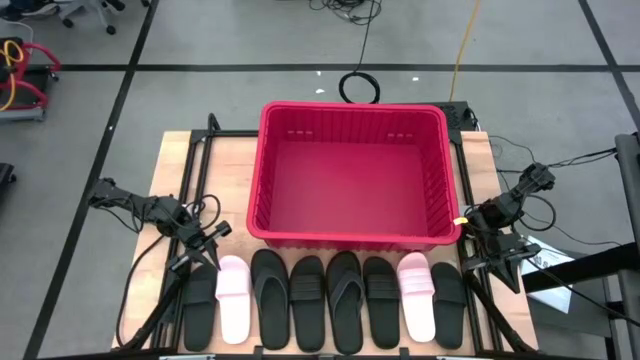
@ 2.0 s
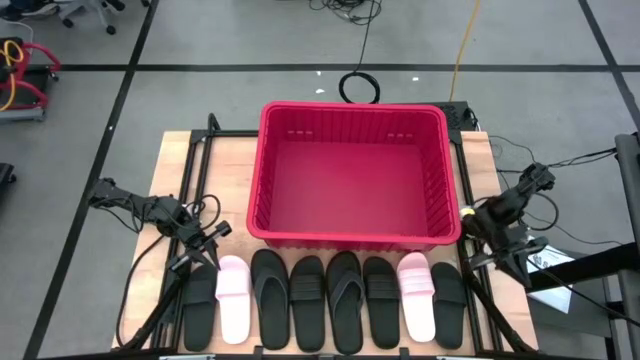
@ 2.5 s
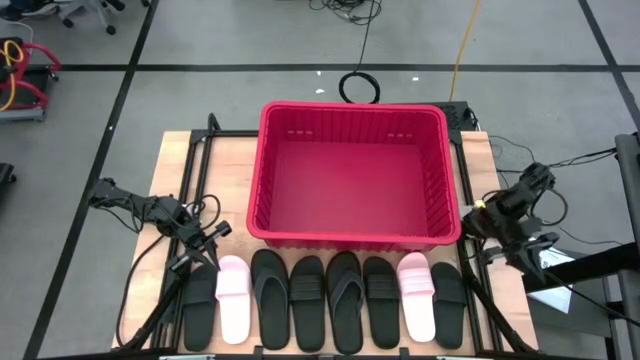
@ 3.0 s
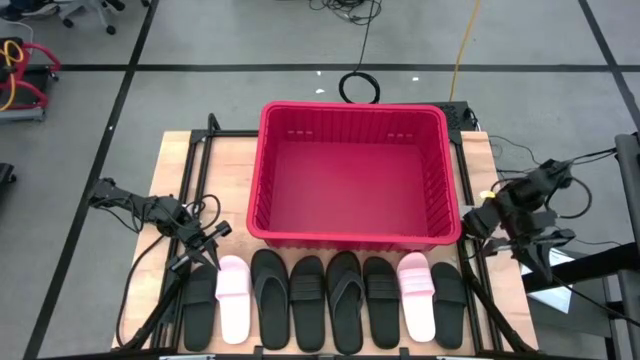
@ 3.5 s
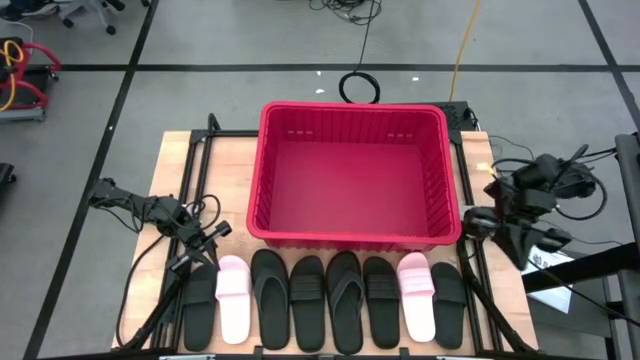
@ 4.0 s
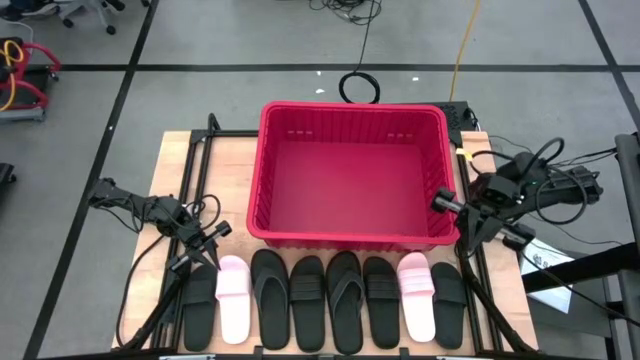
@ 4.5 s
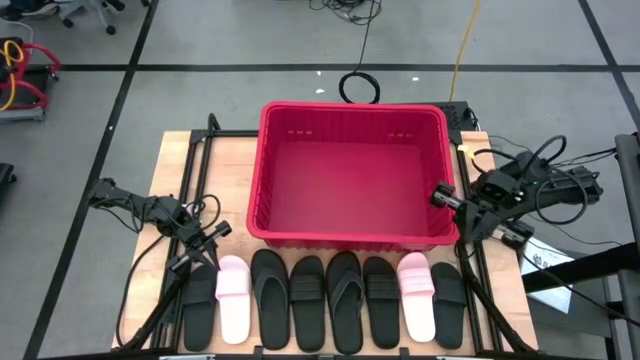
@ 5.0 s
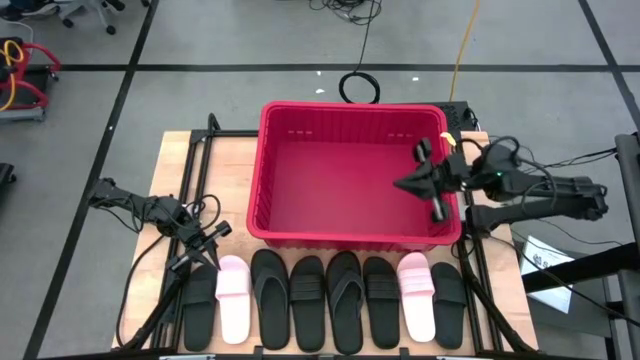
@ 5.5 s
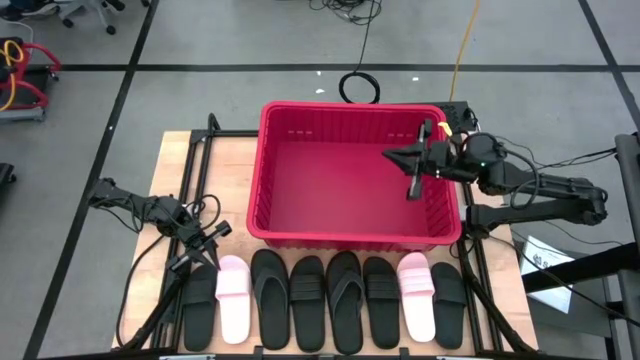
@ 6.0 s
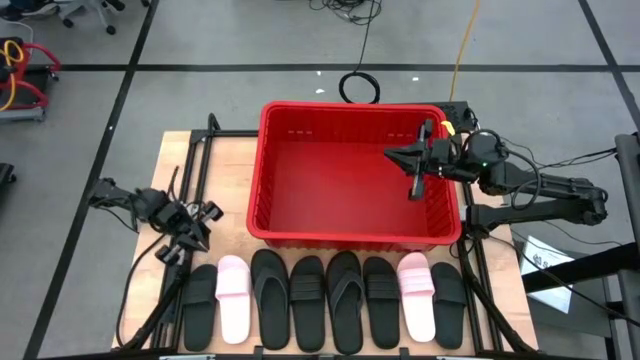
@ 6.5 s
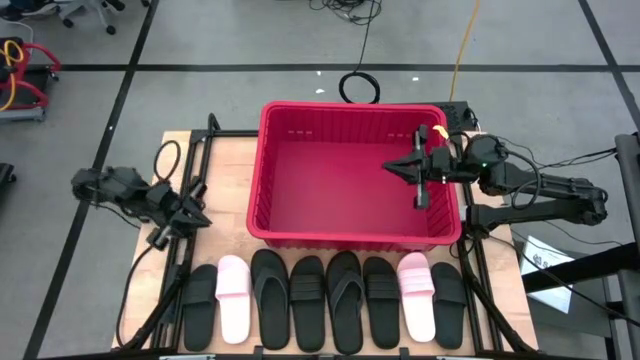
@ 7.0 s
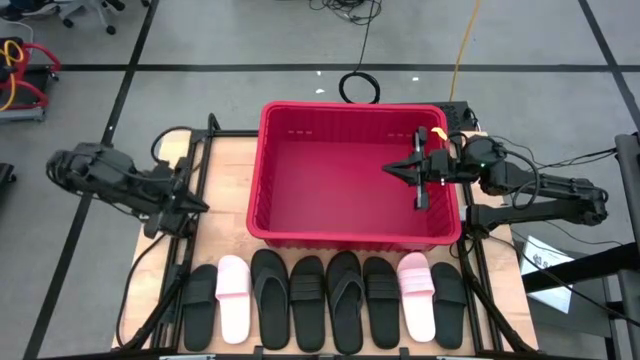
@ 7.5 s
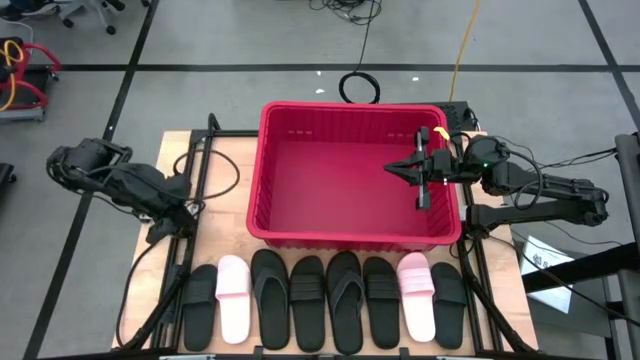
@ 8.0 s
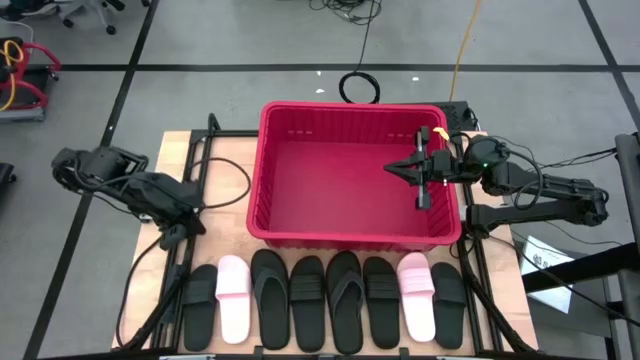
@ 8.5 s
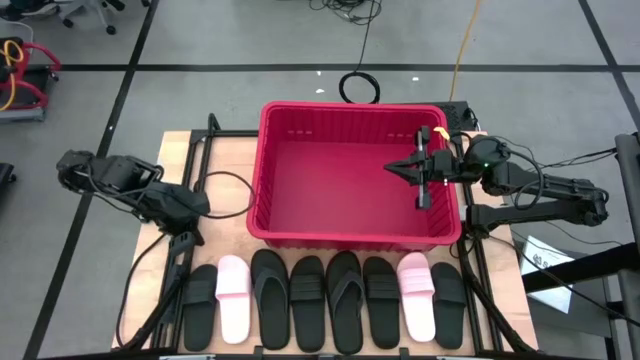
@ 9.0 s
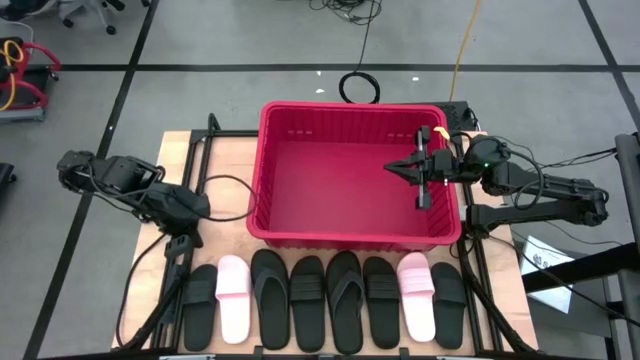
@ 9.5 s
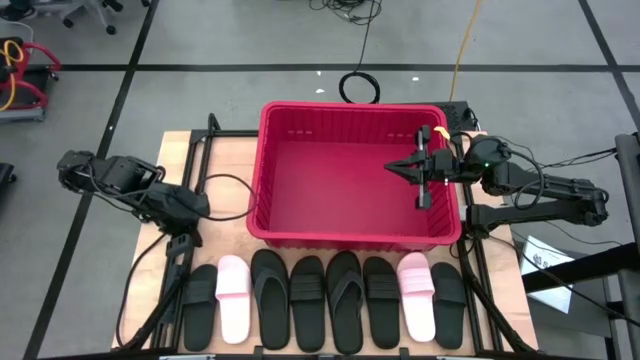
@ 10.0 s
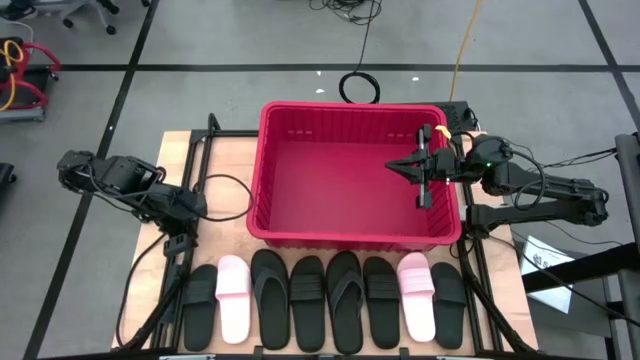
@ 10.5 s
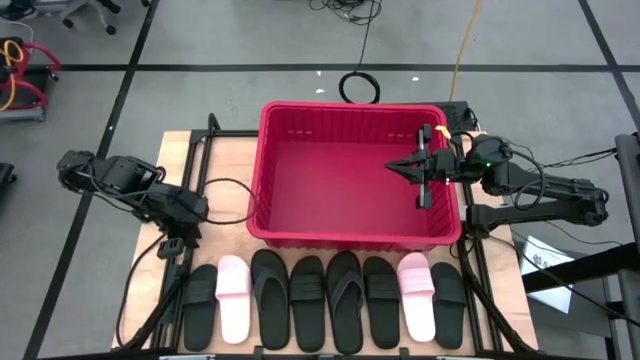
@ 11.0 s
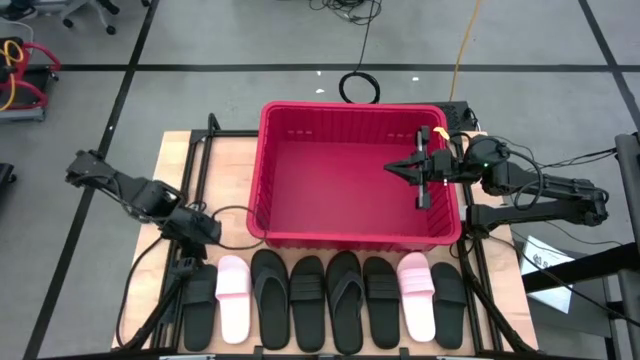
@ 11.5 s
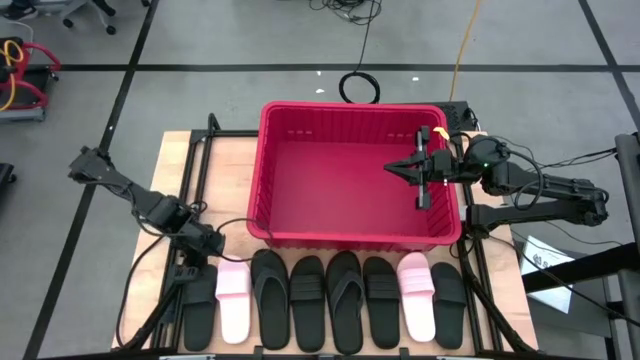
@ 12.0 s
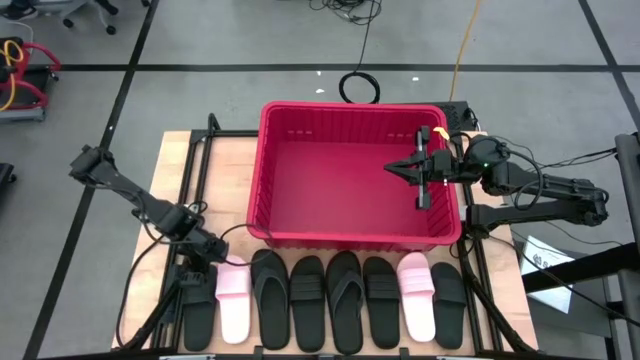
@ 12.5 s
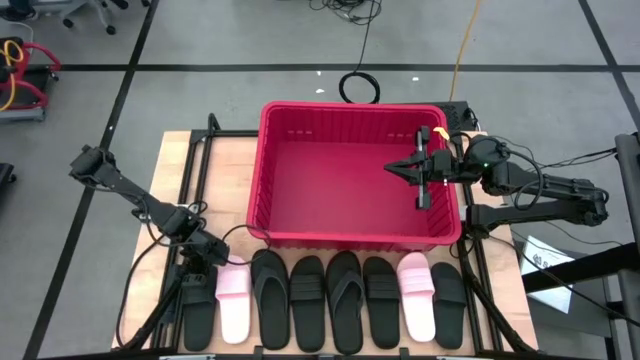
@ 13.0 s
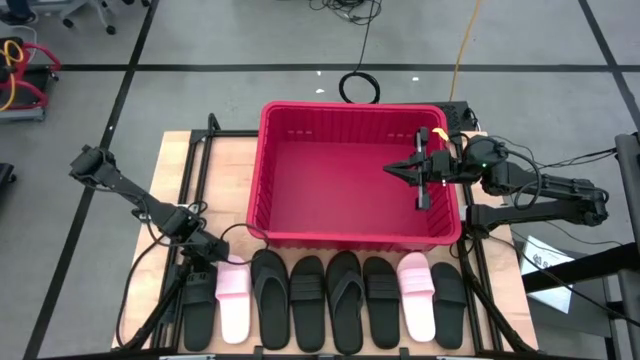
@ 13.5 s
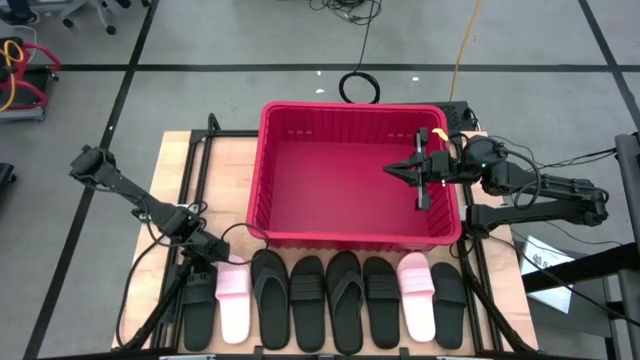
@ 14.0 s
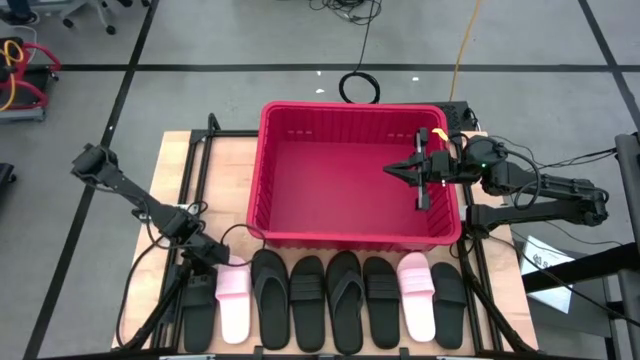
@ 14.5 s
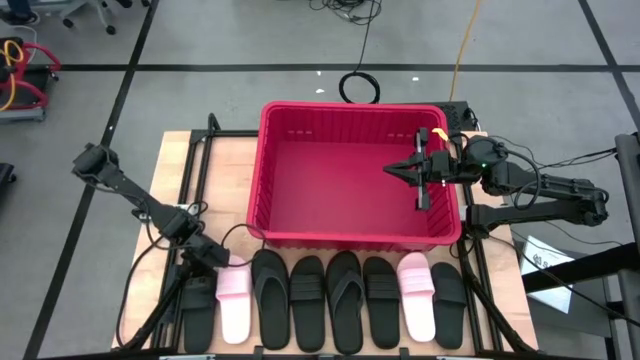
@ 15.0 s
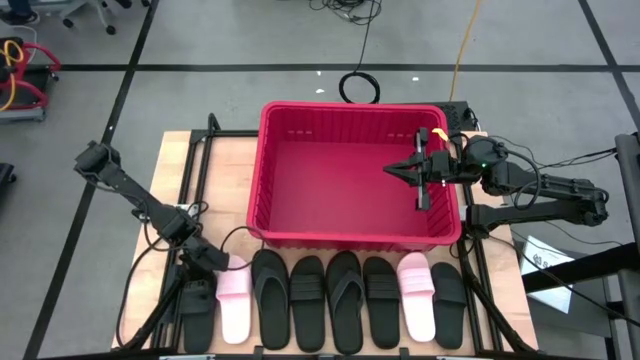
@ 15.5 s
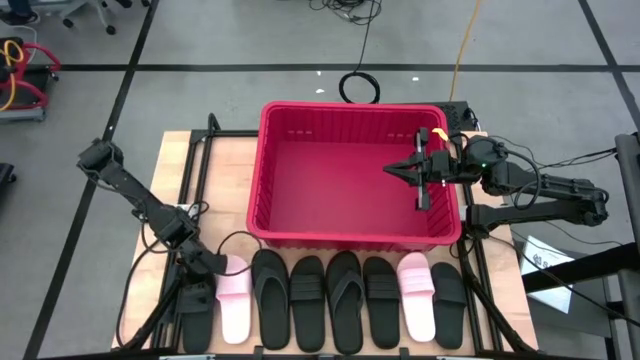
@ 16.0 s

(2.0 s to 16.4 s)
Task: Pick and place slides into bin
Put the black slide into the red bin

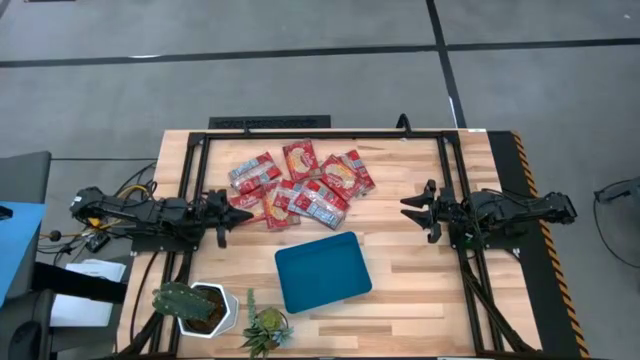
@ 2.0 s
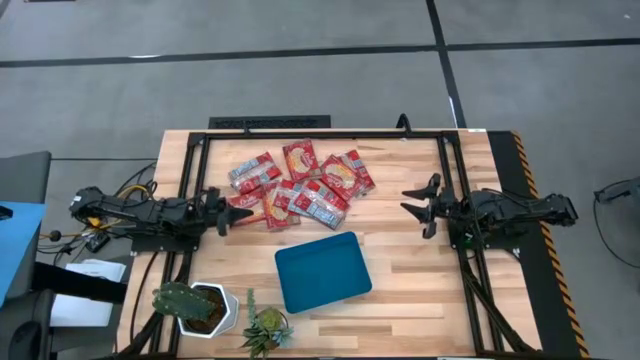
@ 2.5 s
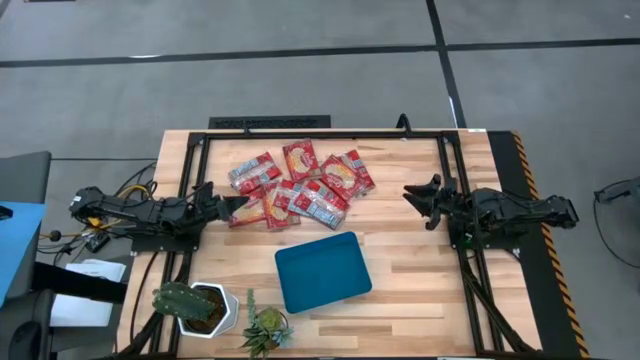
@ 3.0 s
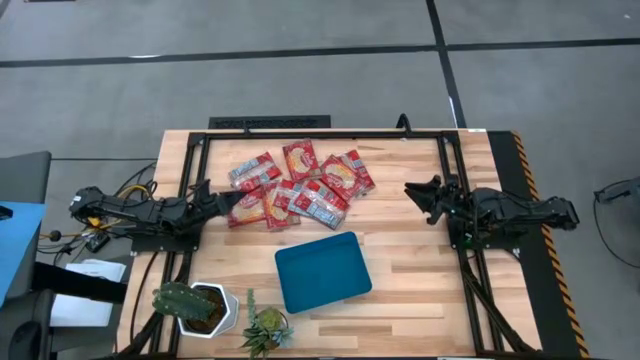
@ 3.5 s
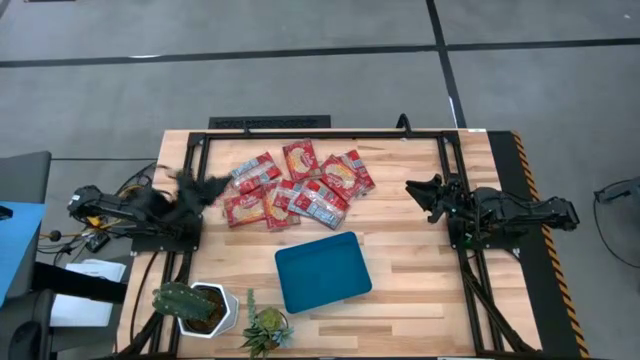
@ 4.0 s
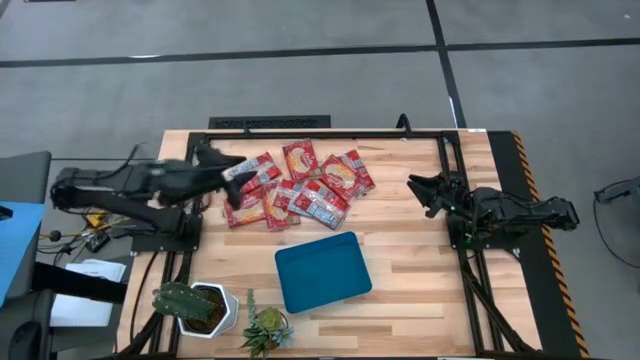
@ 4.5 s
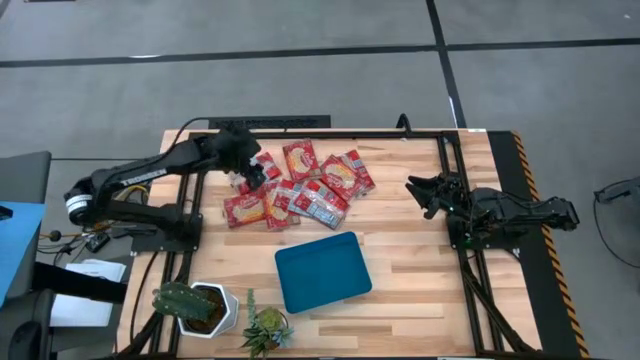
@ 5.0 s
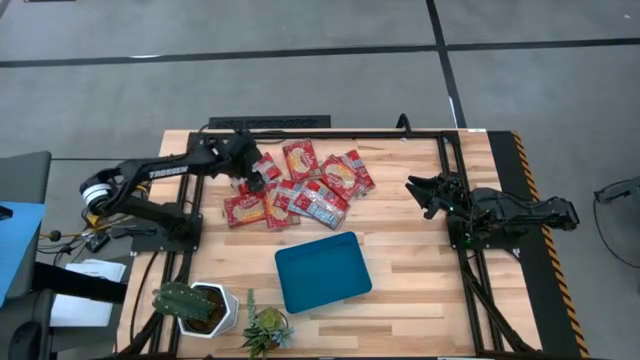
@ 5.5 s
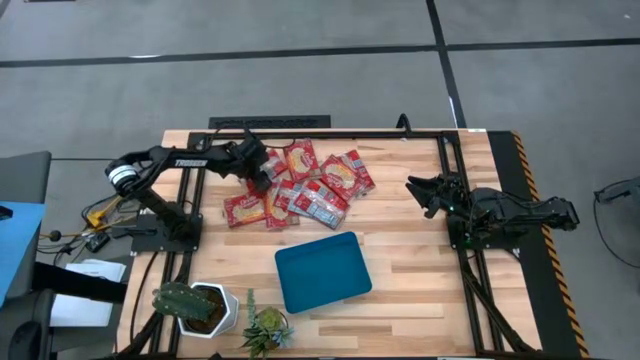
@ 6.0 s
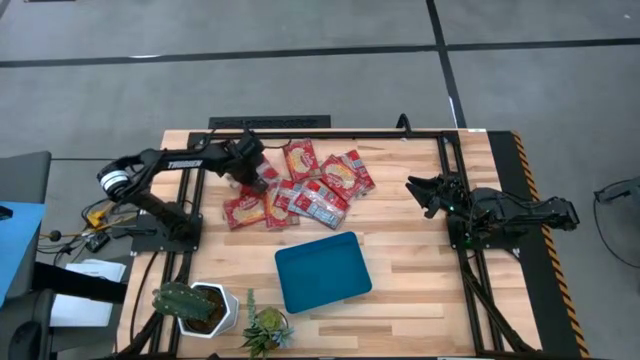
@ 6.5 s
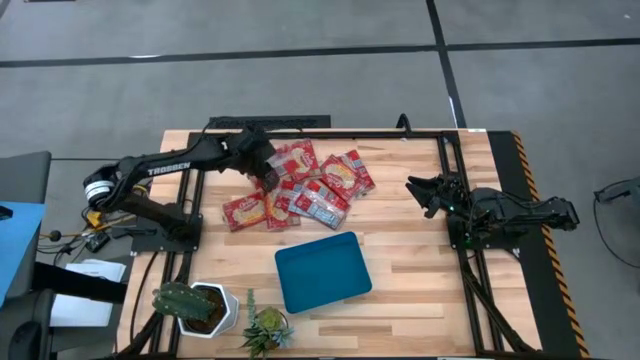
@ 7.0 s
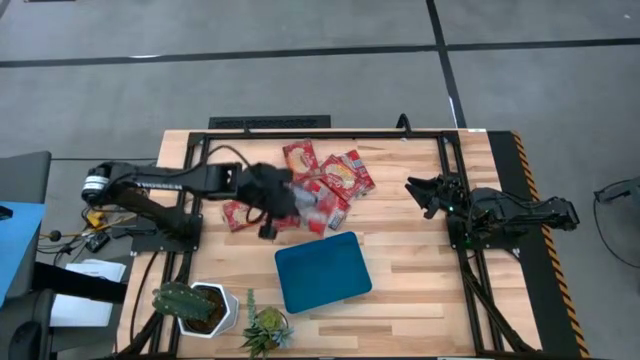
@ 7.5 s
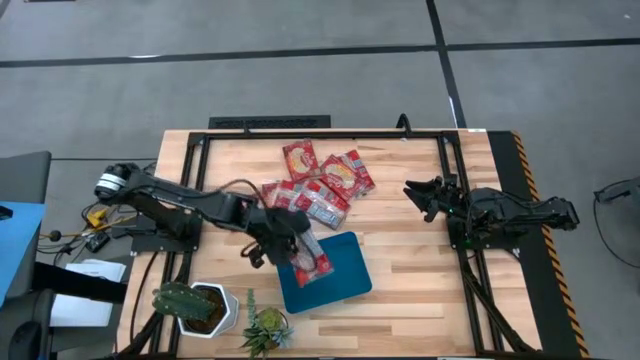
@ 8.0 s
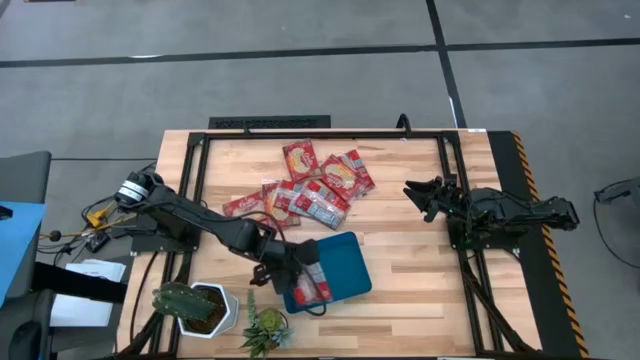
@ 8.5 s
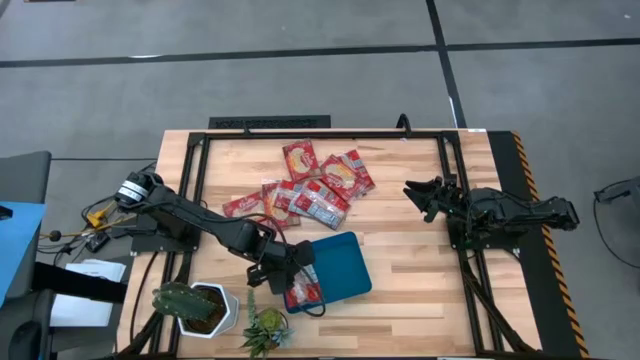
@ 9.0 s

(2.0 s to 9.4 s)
Task: Sort popcorn bags into baskets
Put the popcorn bag into the blue bin
